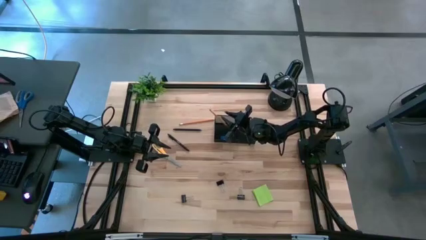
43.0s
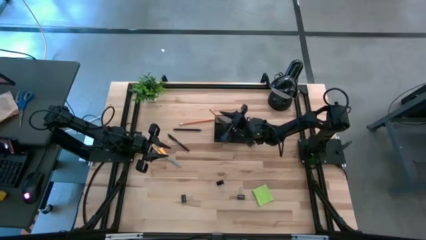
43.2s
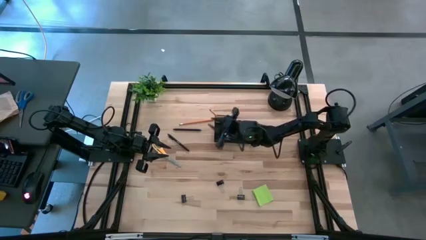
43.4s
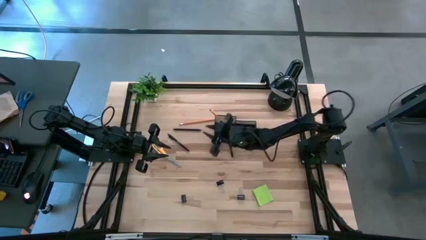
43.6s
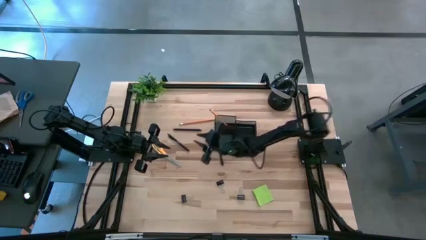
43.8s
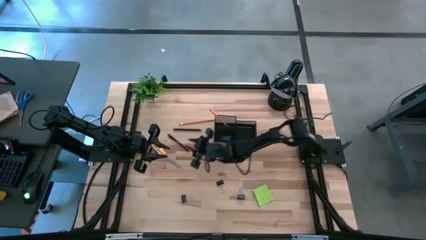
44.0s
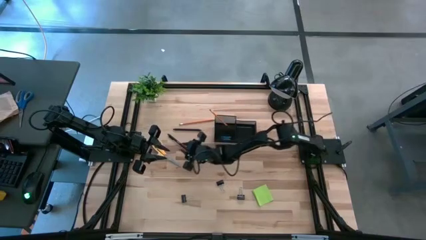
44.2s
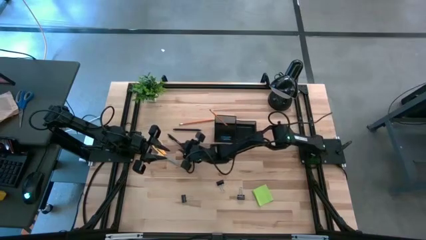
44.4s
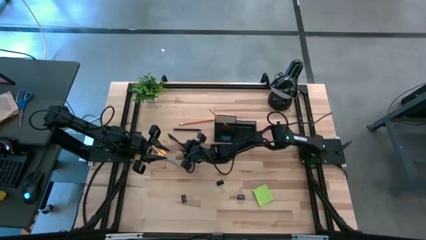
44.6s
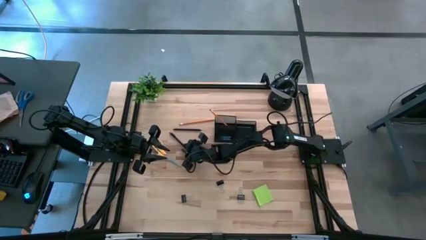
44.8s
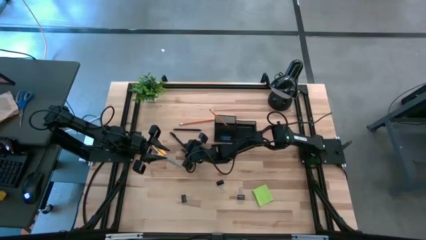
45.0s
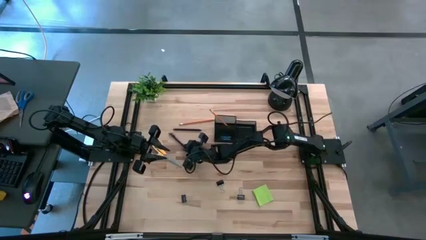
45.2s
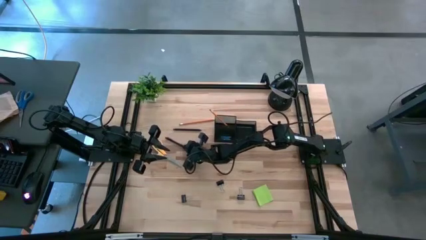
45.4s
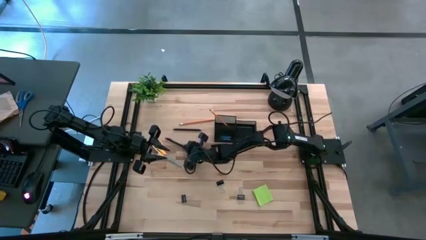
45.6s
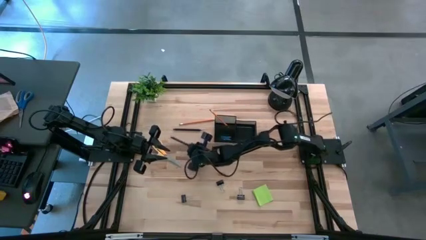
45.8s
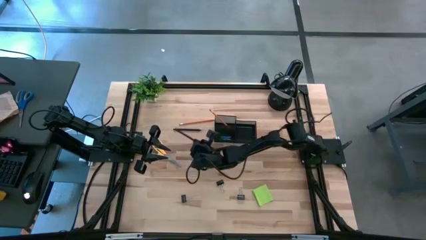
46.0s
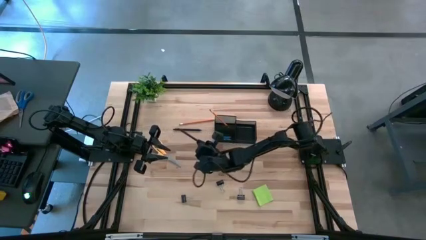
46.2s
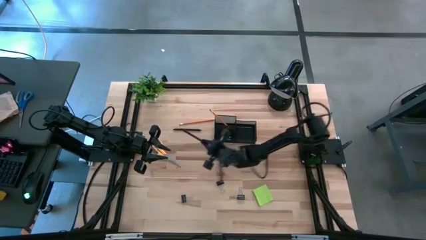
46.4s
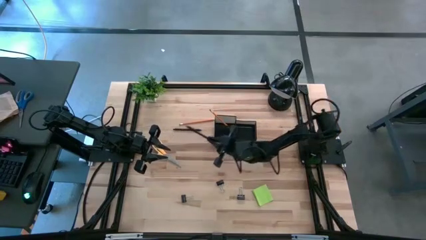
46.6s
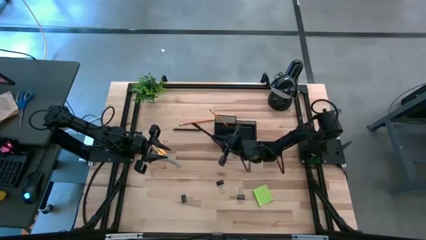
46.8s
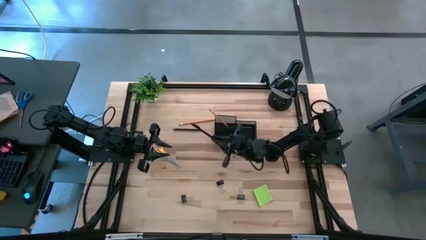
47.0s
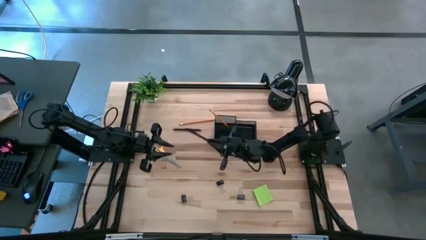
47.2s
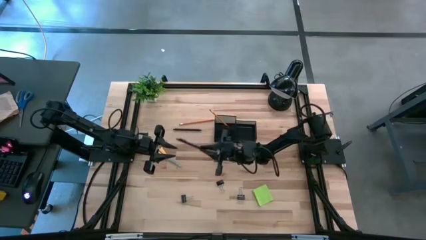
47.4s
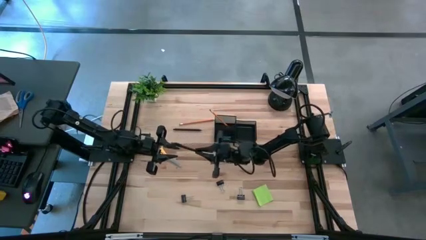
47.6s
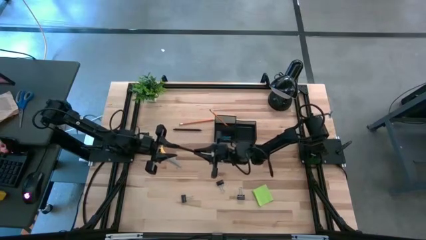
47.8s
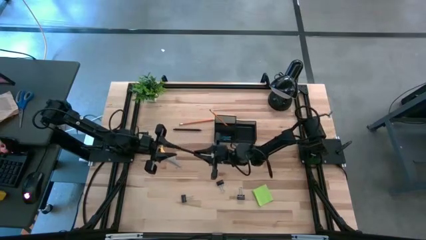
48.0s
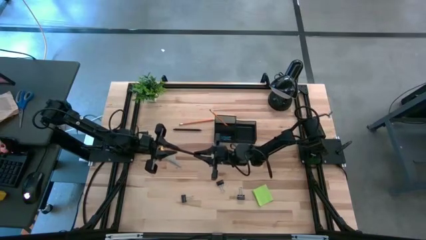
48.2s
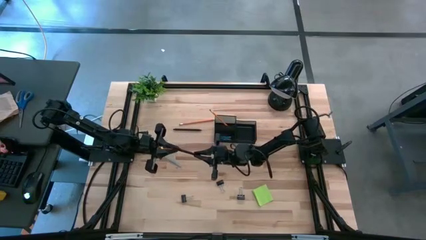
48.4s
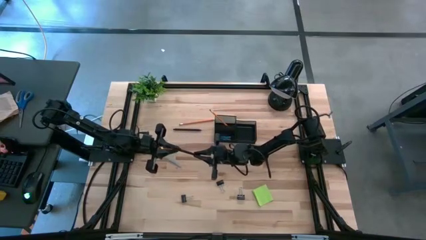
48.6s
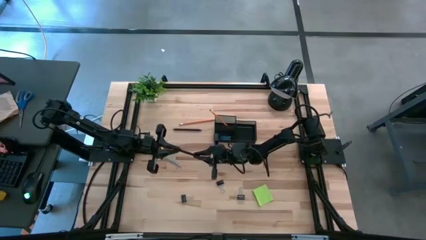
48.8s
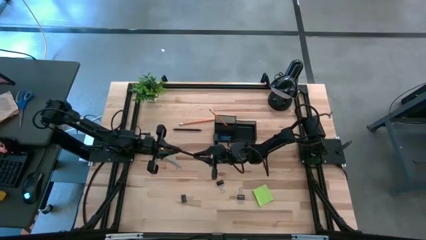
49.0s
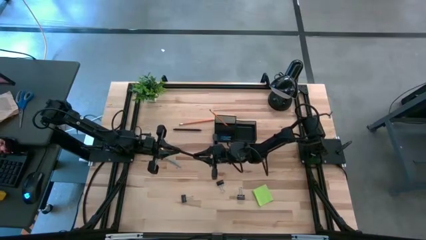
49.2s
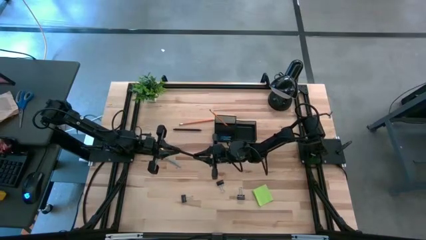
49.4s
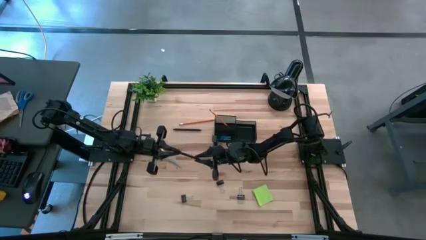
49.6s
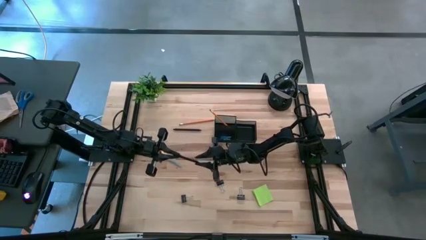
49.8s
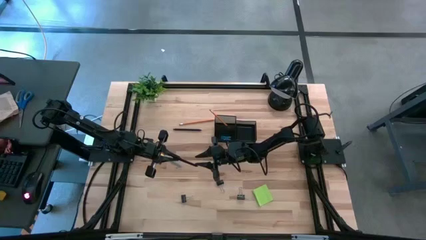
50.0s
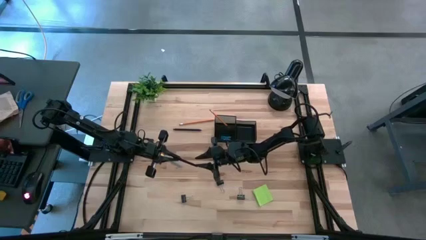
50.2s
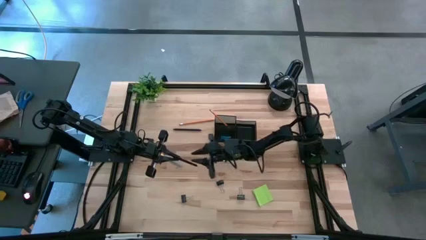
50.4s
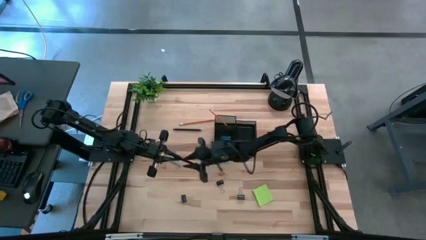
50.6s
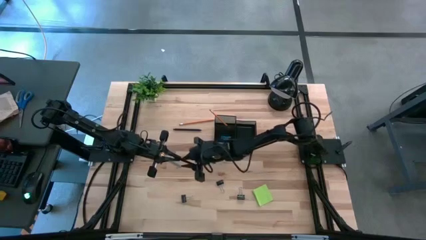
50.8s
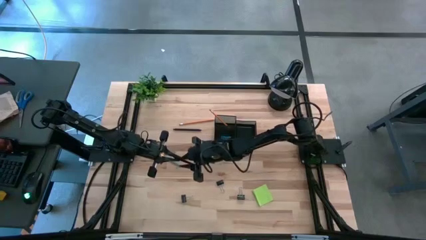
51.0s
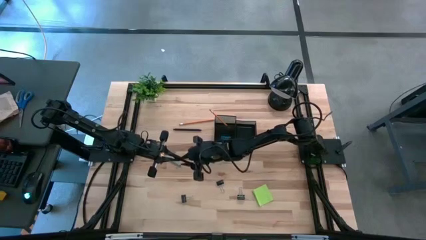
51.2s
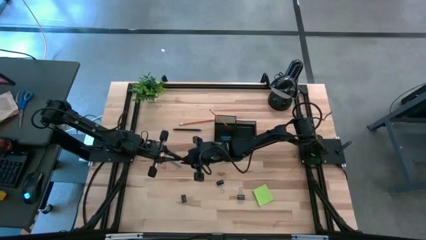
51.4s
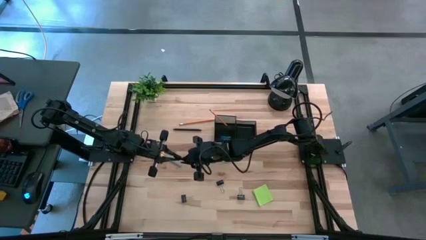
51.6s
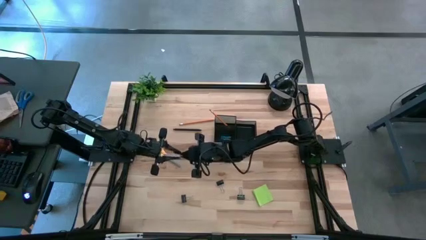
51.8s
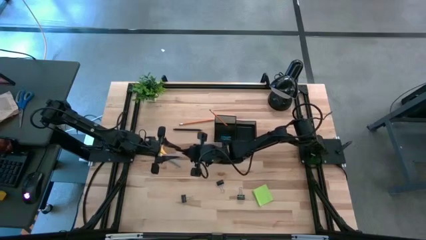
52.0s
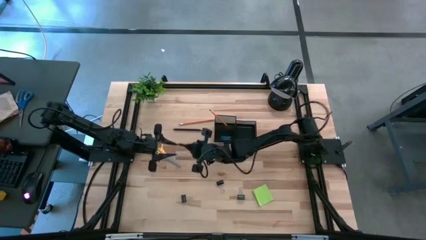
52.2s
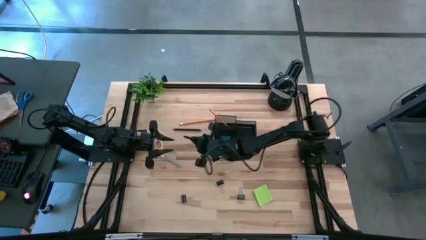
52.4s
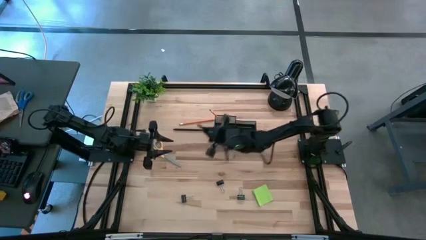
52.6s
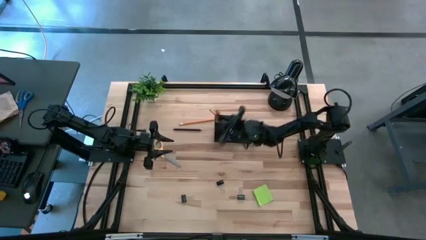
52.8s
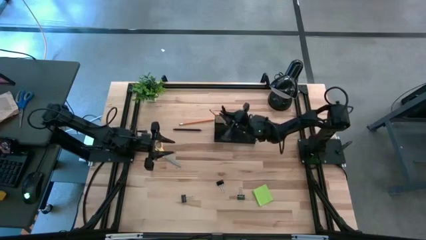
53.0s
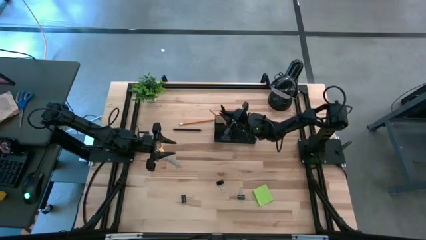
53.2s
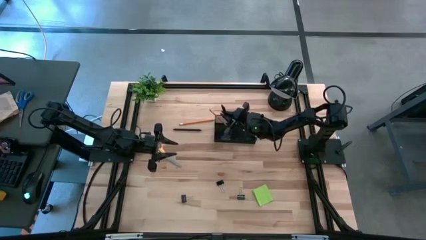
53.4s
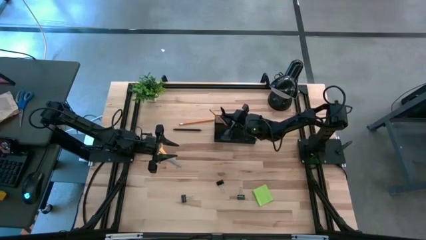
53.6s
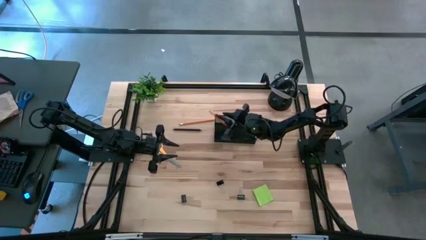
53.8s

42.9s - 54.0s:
Task: Pick and place office supplies into organizer
Put the black pen into the desk organizer

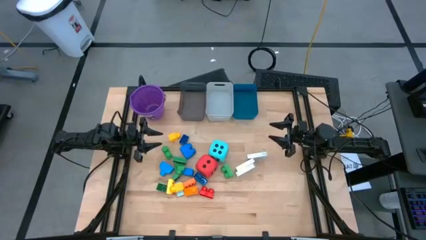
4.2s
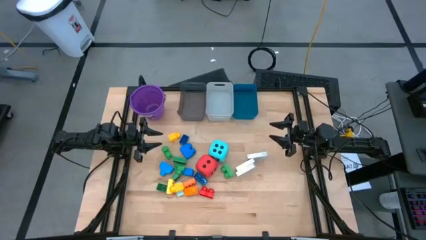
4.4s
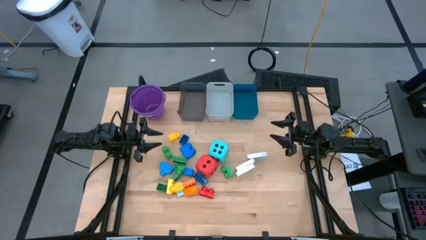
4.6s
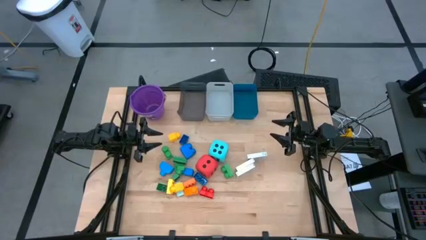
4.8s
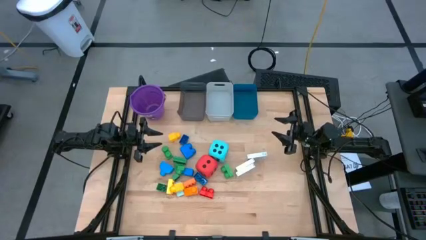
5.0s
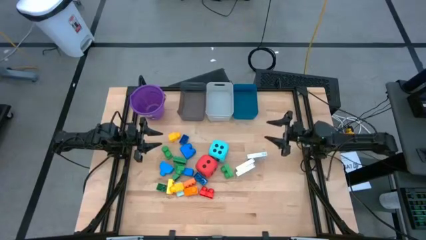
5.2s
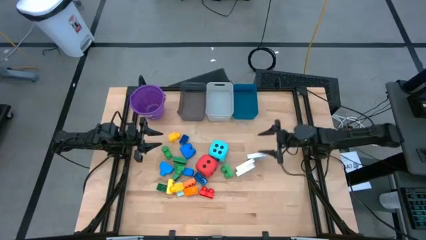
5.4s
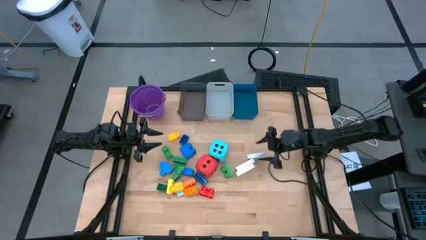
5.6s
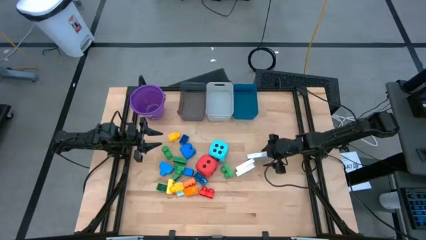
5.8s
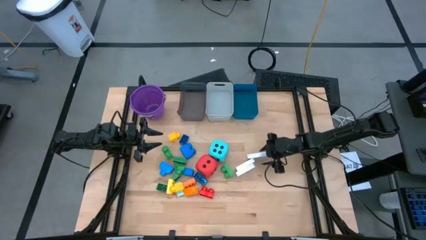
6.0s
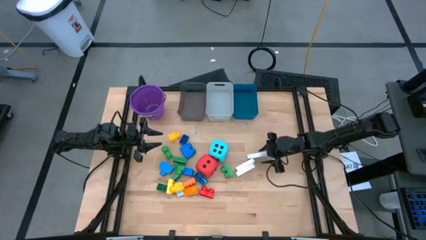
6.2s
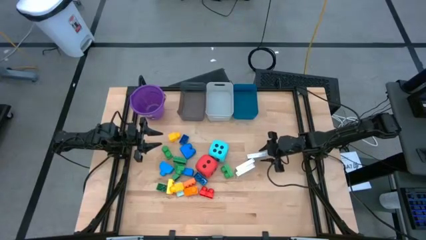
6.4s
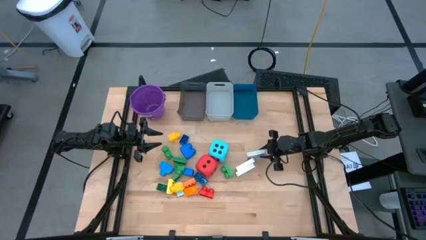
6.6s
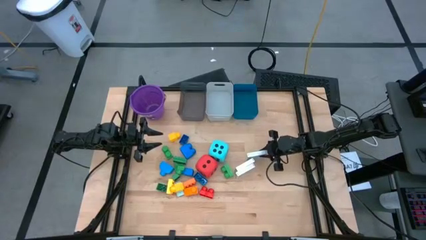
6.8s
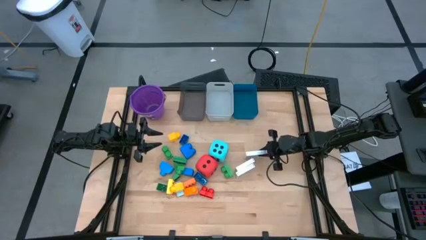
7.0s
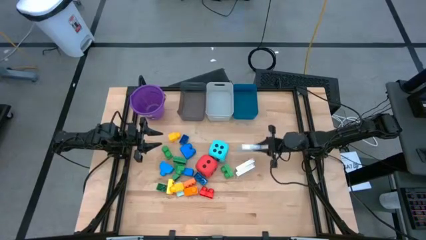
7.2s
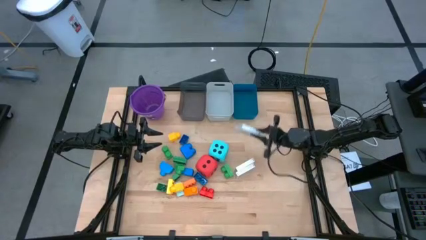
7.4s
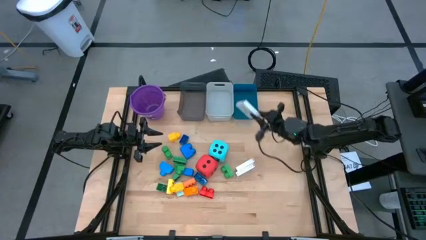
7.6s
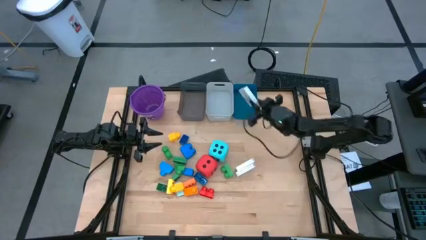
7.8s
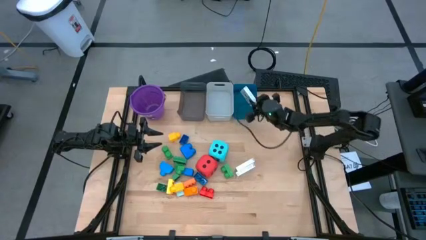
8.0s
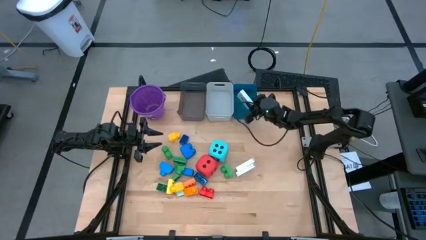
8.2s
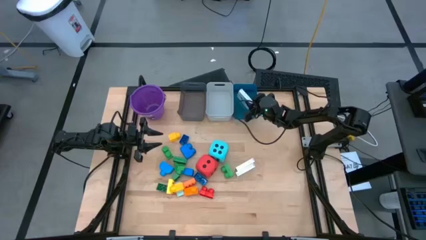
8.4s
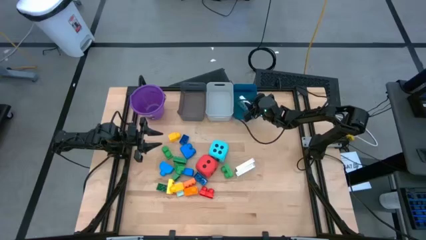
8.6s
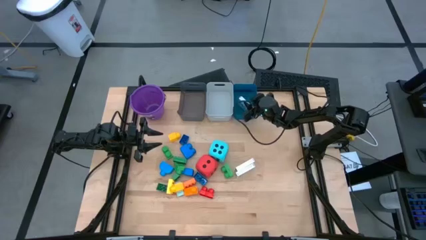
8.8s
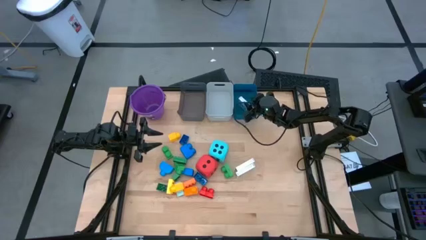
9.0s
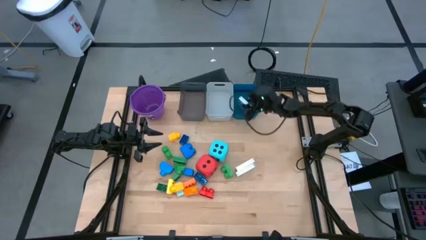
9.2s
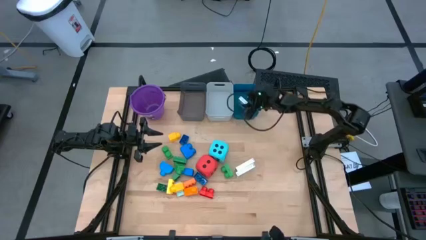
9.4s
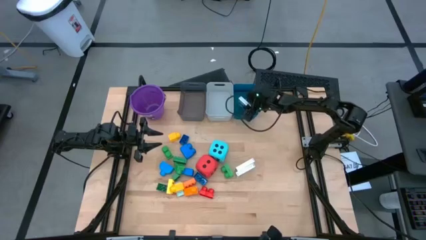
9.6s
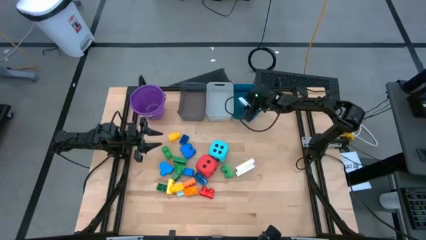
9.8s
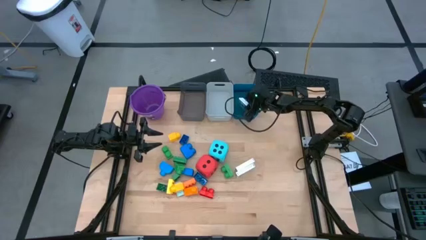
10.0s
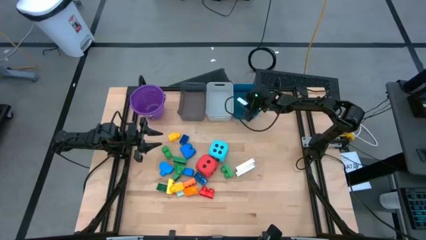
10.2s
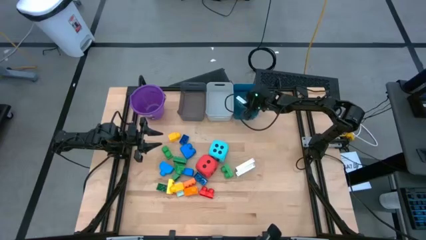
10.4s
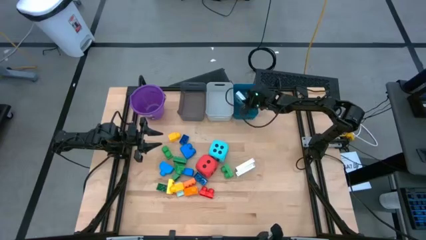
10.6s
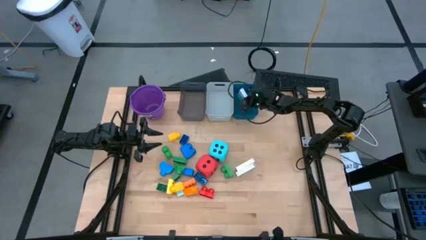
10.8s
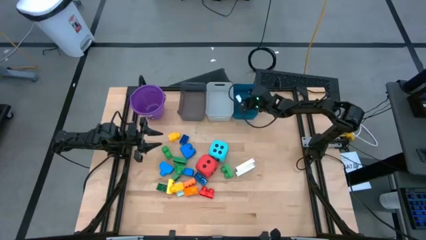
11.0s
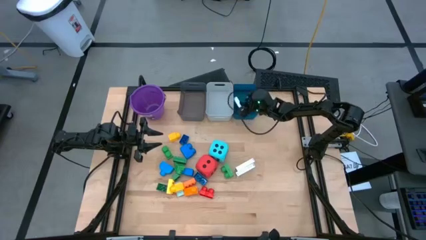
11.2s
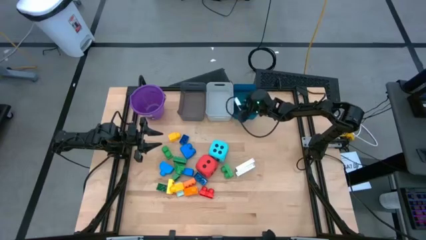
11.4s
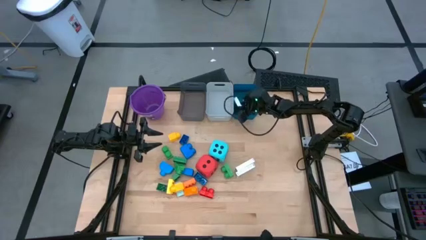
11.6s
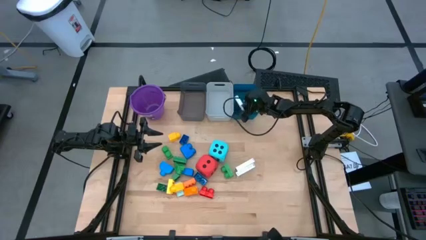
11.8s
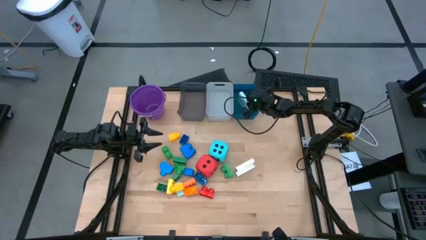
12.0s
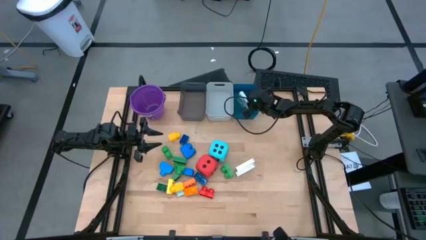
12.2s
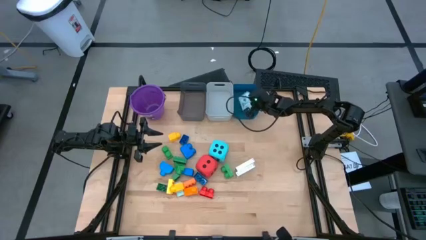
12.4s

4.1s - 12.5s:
Task: Pick & Place Toys
Put the blue deck of cards into the blue bin
